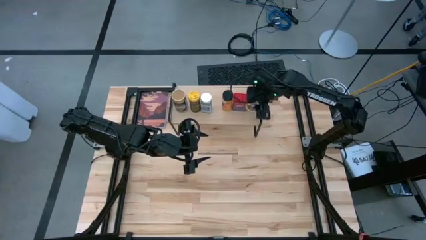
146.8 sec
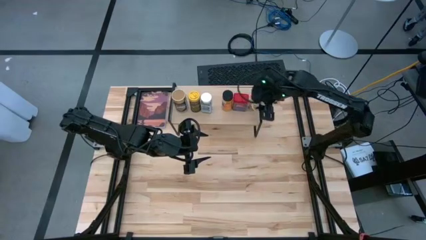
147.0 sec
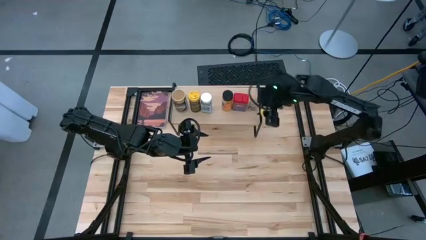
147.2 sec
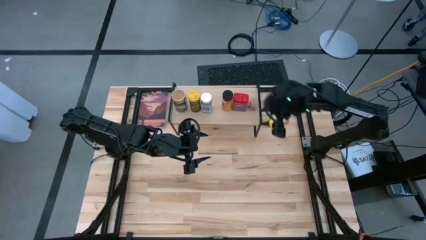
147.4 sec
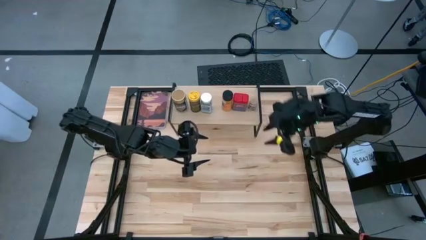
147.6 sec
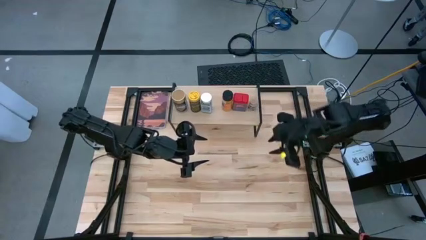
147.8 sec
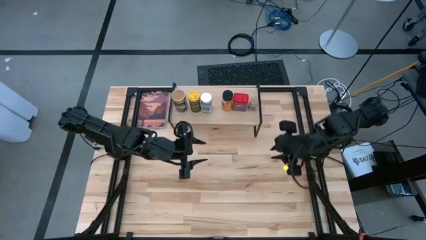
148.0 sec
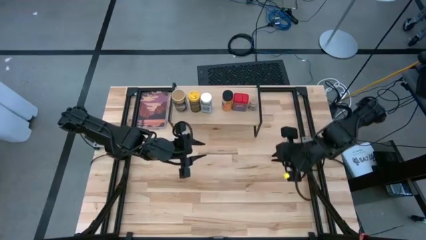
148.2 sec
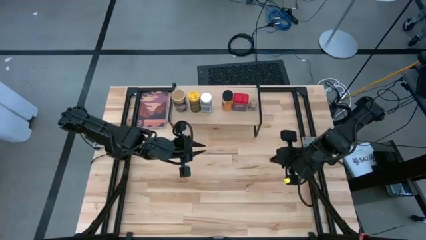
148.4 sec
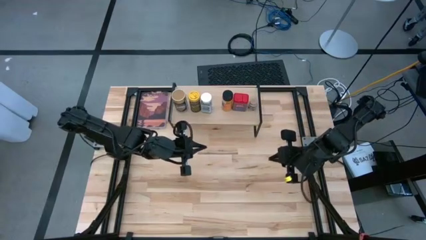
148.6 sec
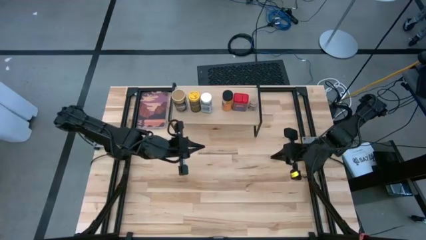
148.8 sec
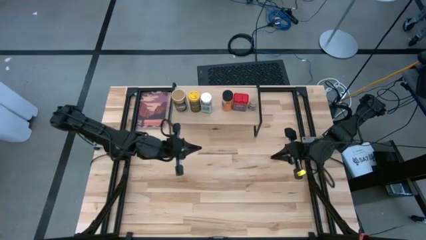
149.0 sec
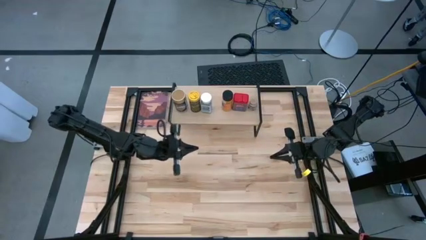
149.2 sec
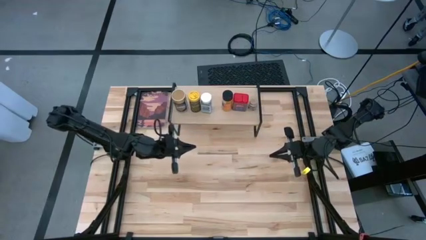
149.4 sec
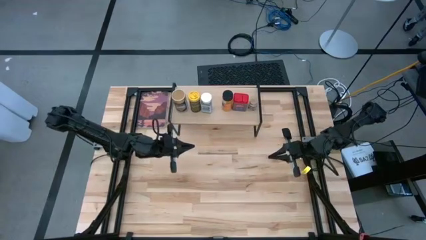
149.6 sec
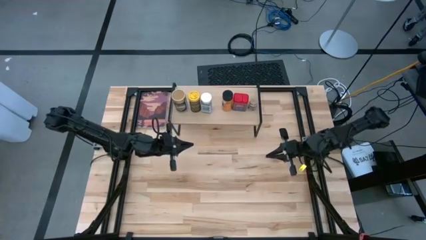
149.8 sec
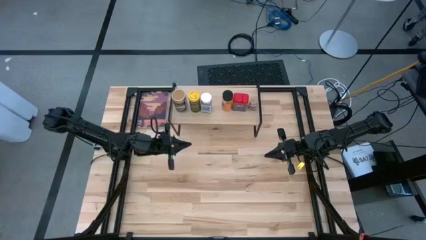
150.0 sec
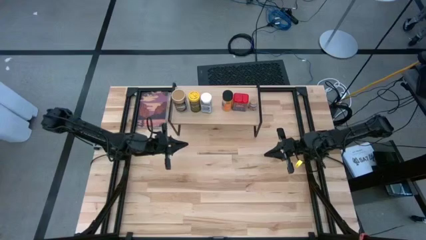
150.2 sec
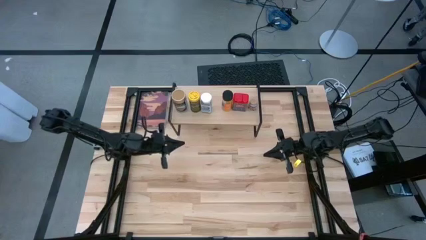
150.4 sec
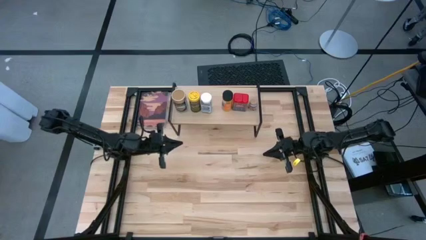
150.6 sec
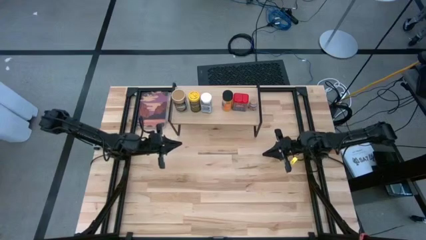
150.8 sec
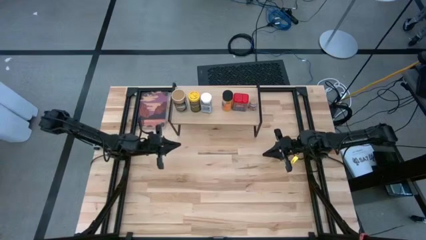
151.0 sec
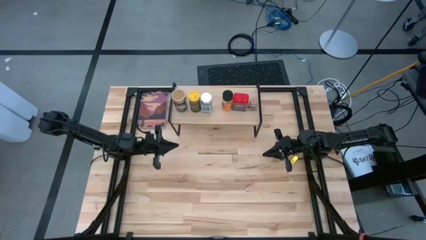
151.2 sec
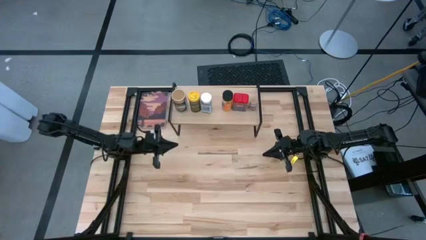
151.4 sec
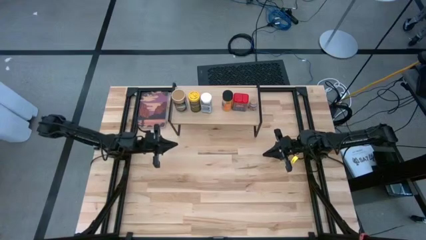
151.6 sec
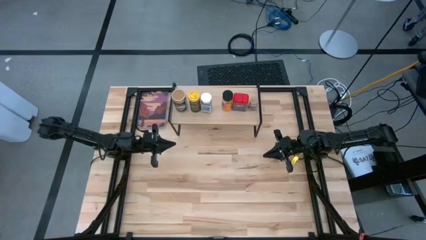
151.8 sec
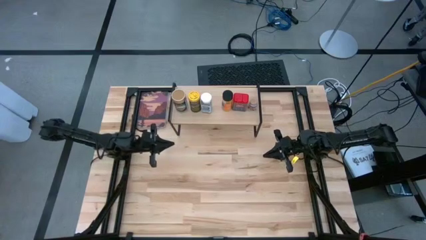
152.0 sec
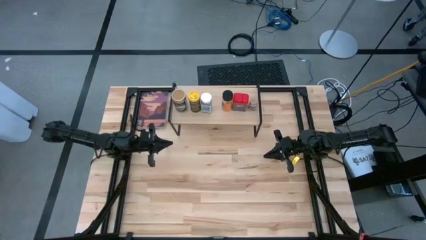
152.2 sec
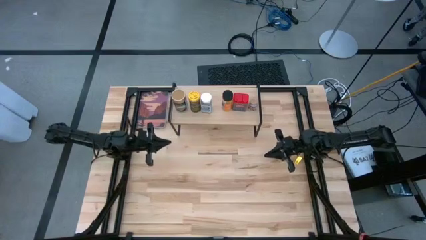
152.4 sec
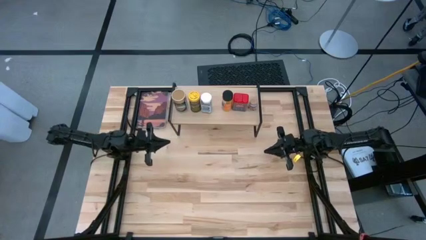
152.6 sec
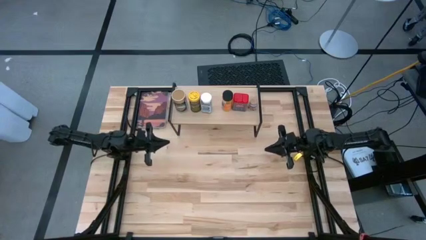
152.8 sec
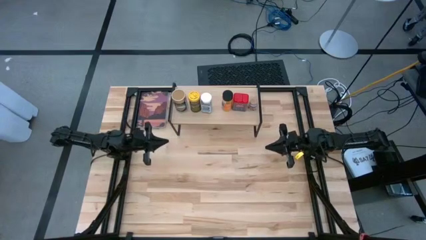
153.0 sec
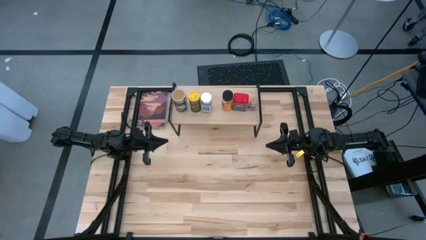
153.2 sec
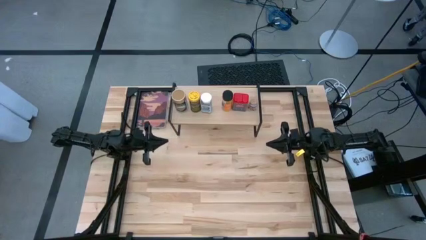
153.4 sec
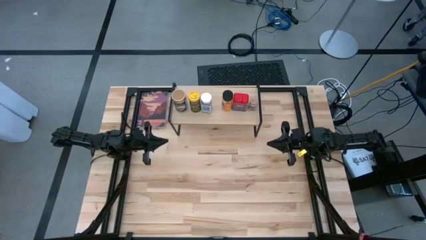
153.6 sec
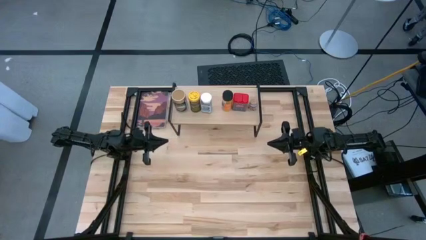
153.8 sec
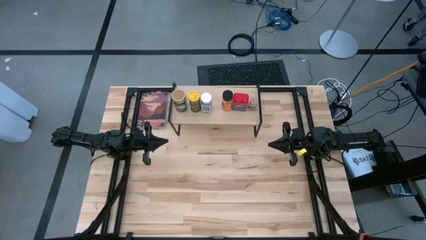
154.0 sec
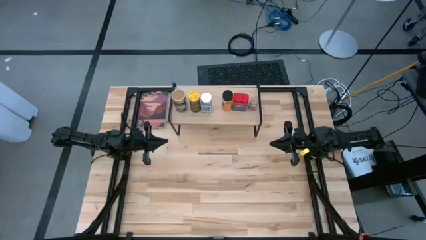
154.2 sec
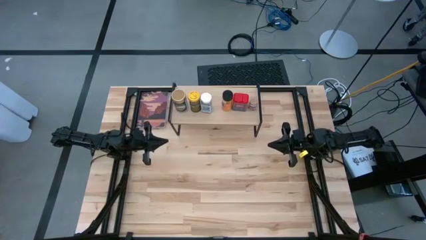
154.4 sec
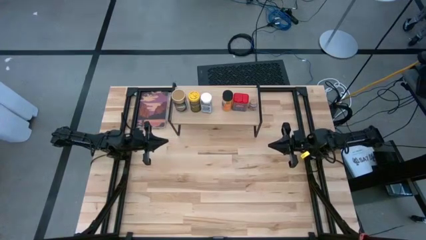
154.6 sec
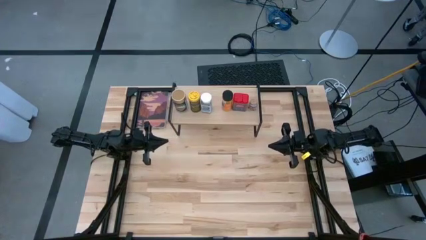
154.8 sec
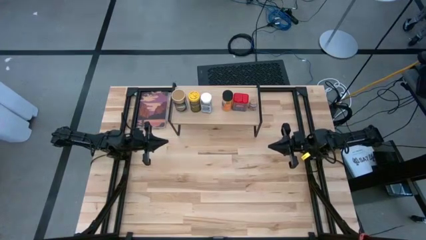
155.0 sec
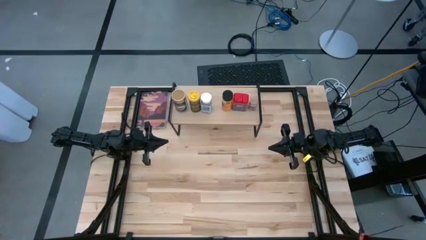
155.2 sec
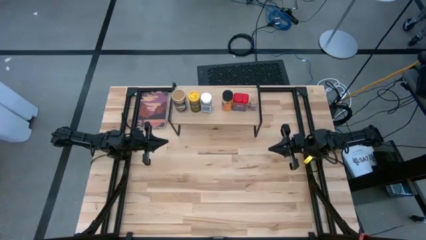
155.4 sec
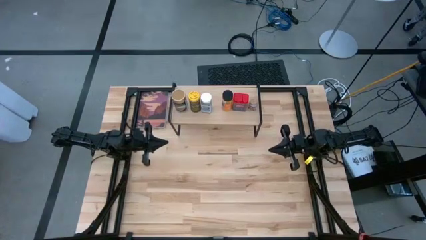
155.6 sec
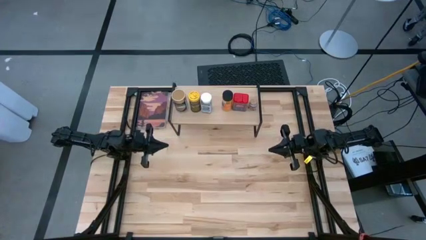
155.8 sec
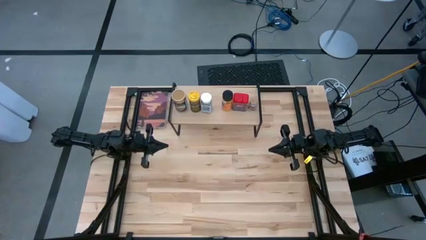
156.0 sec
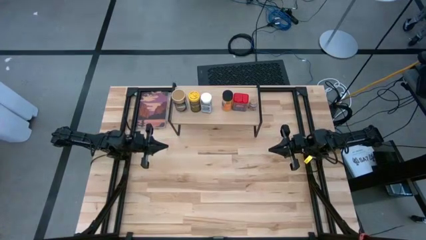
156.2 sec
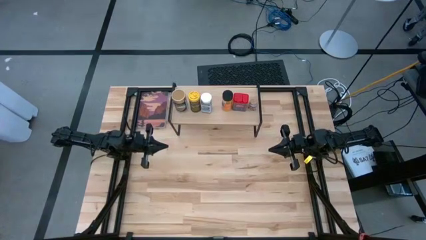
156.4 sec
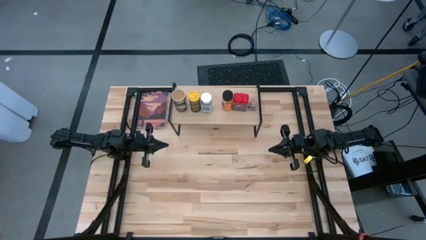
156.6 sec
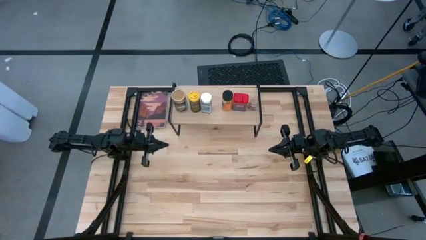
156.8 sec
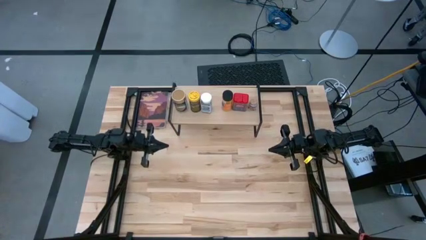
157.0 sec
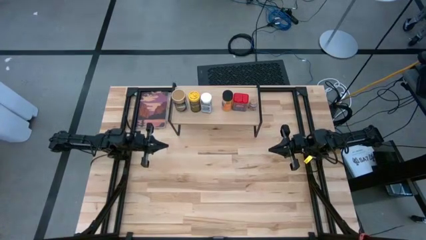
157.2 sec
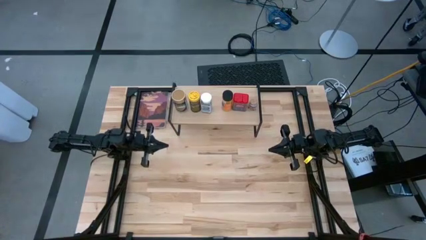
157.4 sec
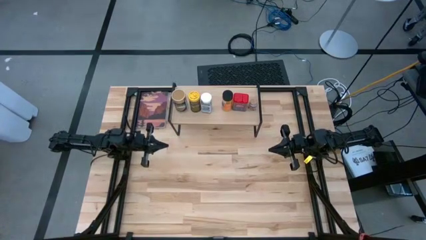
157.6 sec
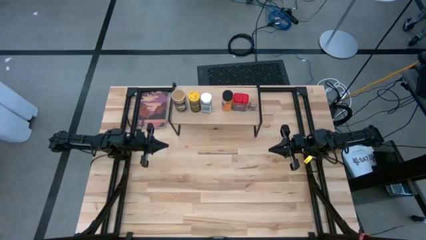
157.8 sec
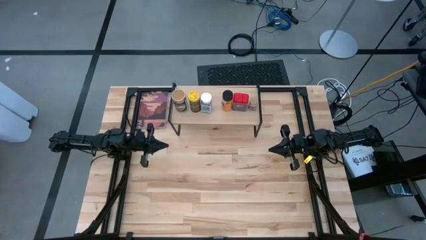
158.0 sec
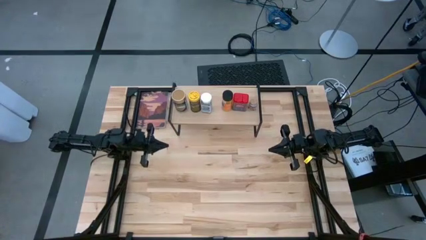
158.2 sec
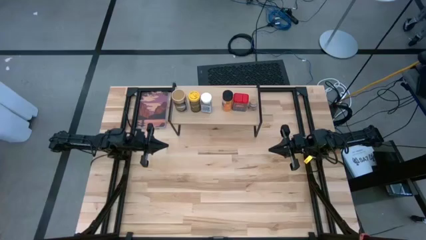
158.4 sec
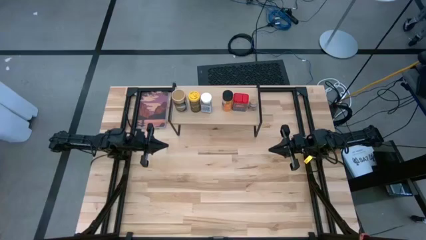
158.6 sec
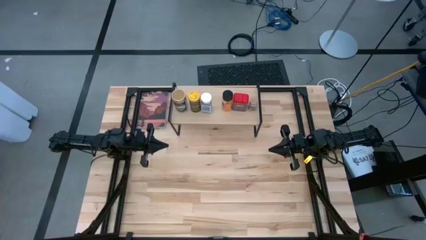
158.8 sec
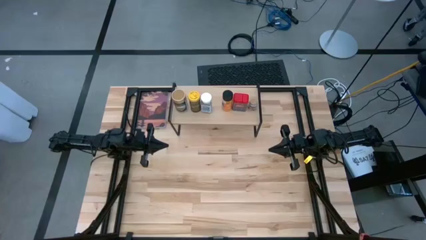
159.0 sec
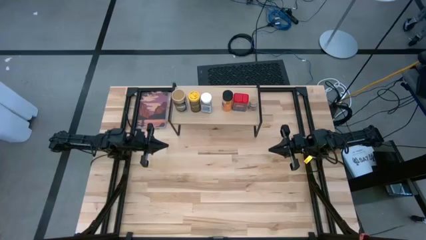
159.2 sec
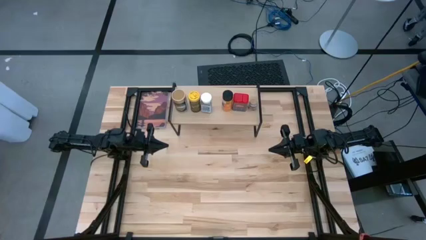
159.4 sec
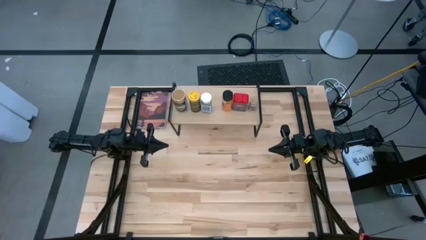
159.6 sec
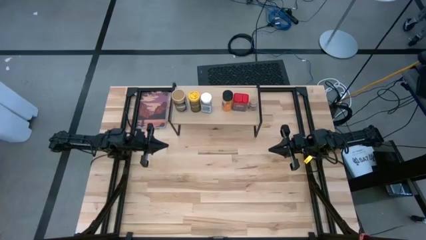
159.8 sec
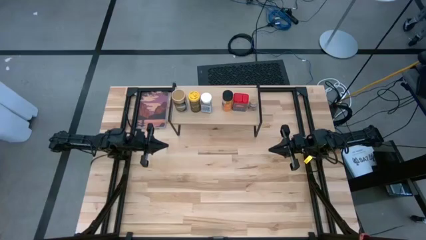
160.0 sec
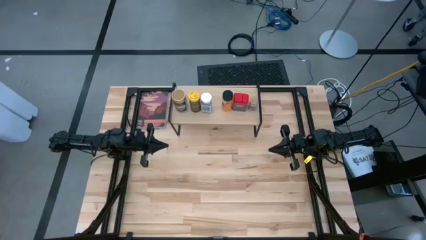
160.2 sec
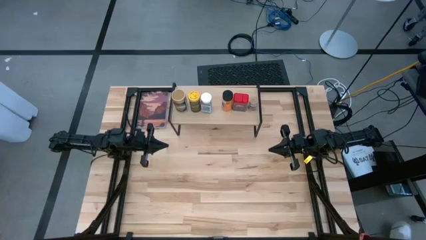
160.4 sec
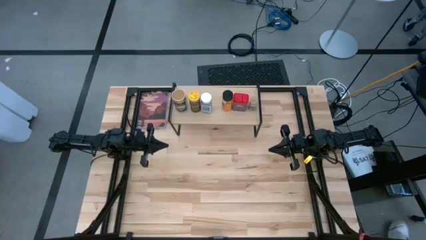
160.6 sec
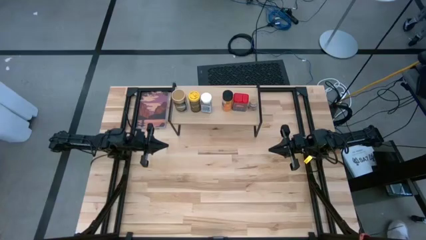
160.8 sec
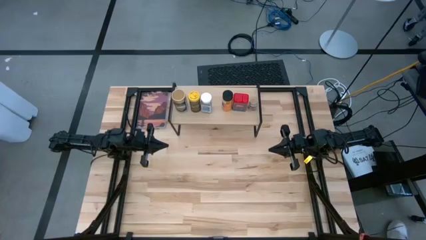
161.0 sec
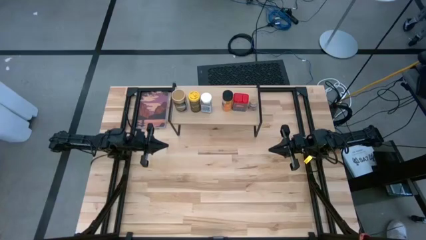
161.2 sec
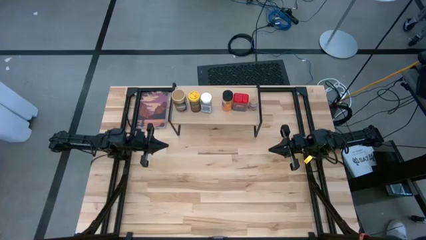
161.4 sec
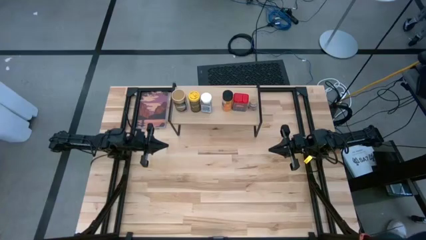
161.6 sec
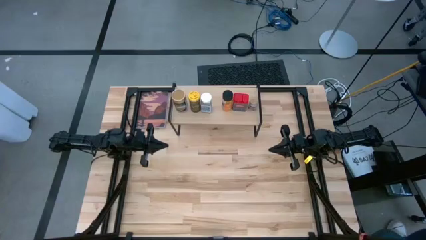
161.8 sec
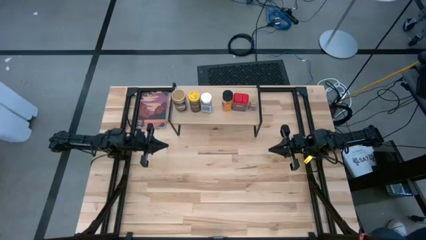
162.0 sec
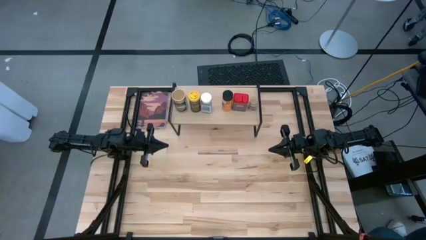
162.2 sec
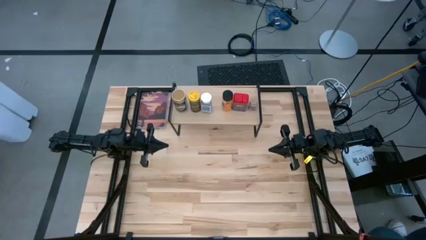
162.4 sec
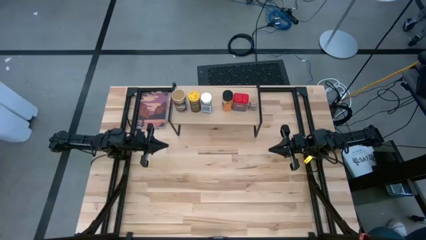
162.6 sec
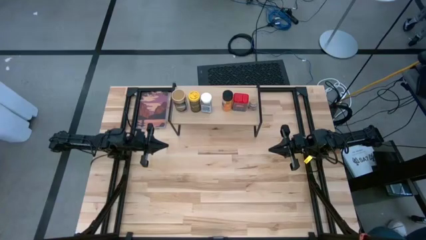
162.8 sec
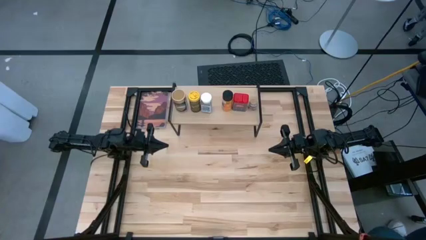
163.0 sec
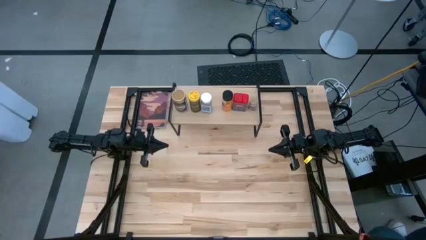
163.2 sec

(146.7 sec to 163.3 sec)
Task: Shelf spices
Return to Home Position
